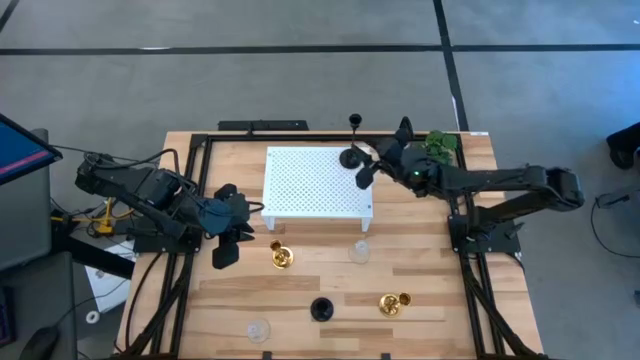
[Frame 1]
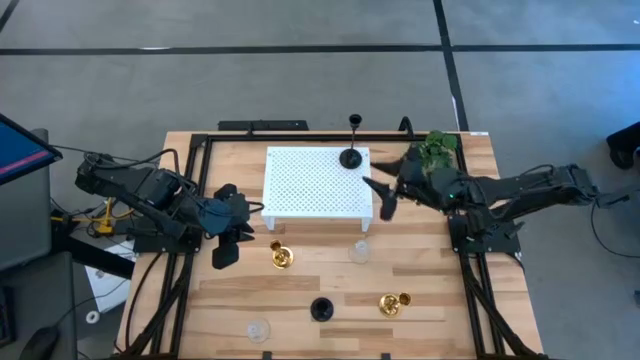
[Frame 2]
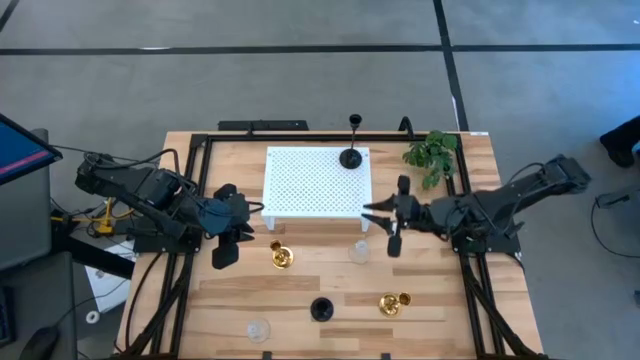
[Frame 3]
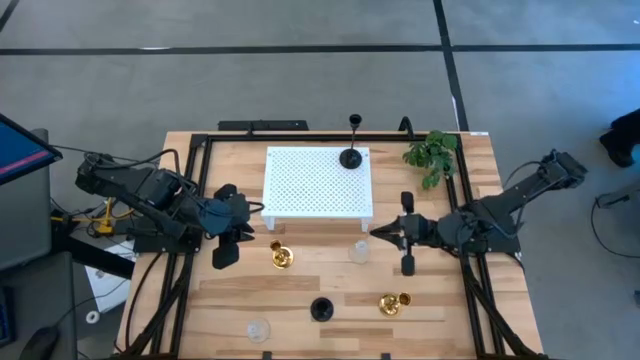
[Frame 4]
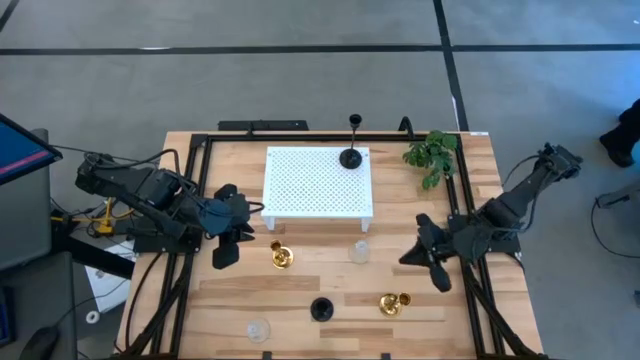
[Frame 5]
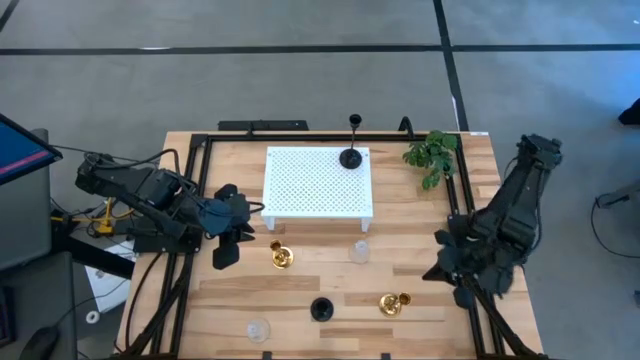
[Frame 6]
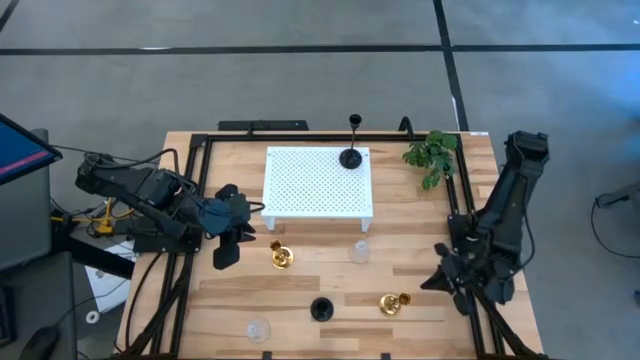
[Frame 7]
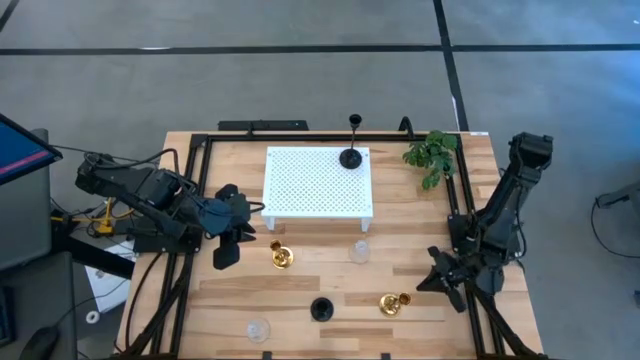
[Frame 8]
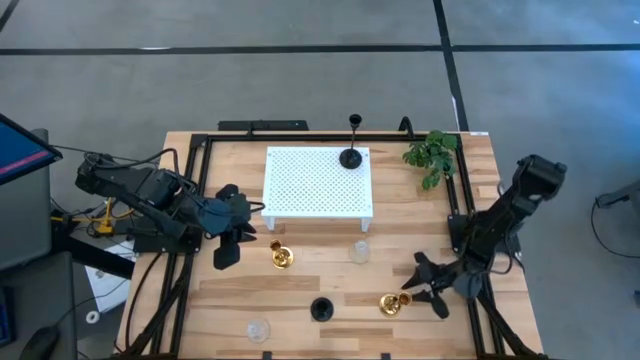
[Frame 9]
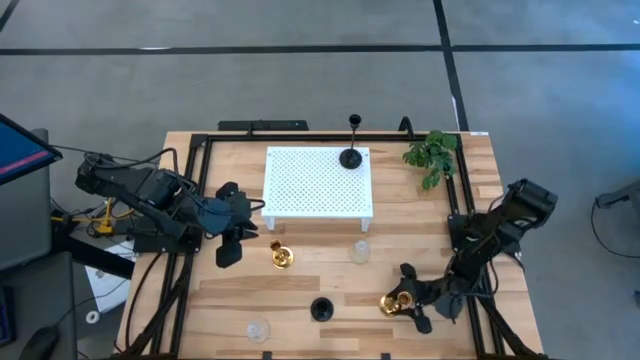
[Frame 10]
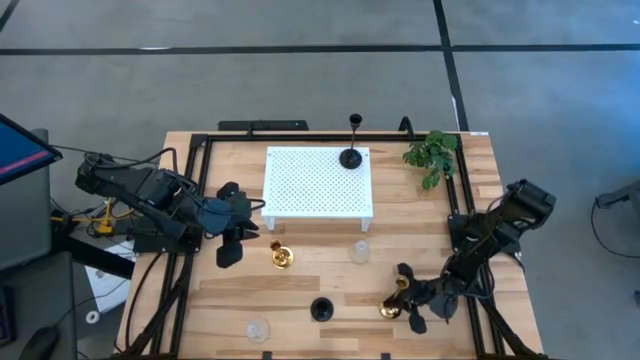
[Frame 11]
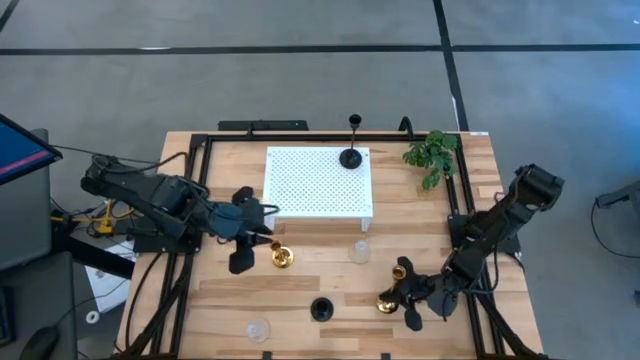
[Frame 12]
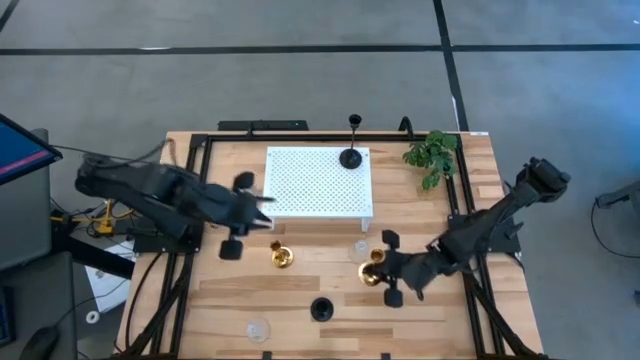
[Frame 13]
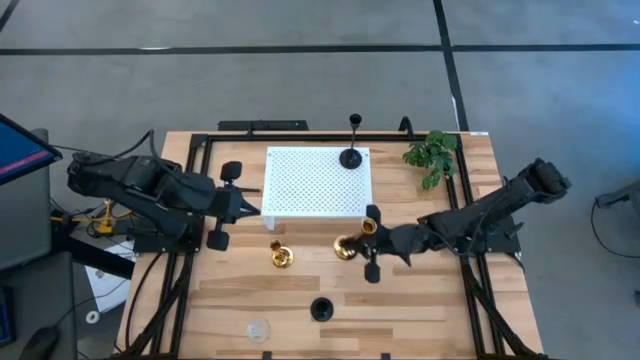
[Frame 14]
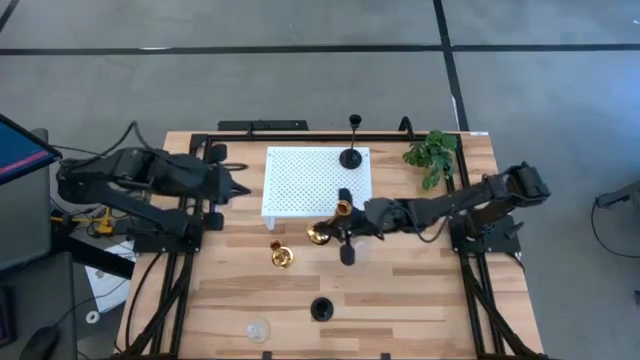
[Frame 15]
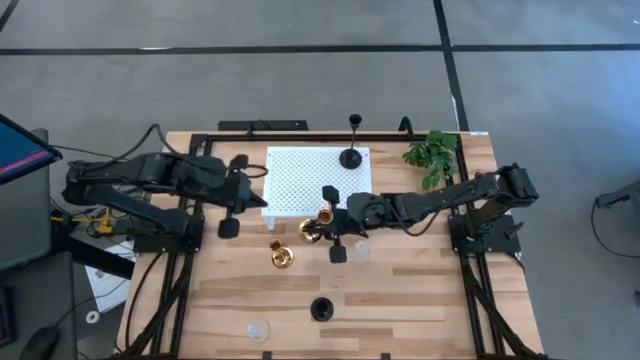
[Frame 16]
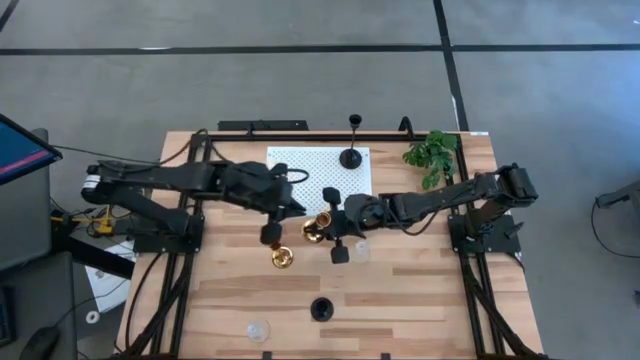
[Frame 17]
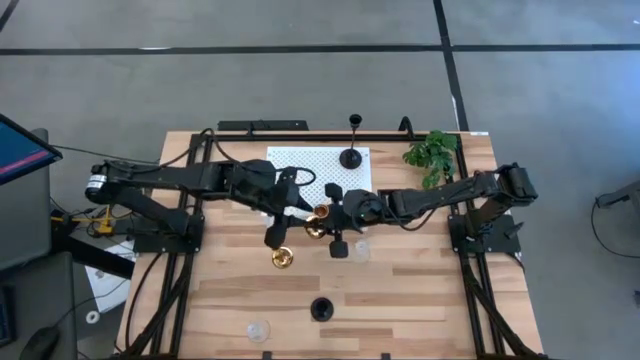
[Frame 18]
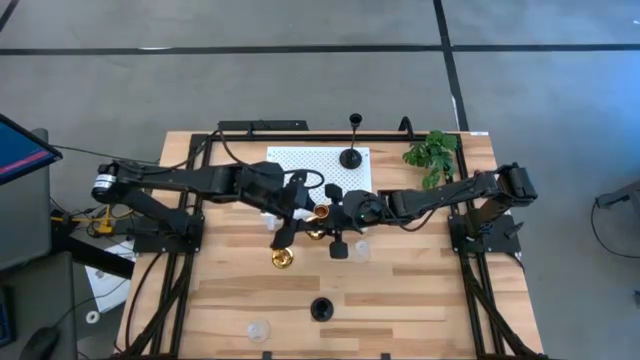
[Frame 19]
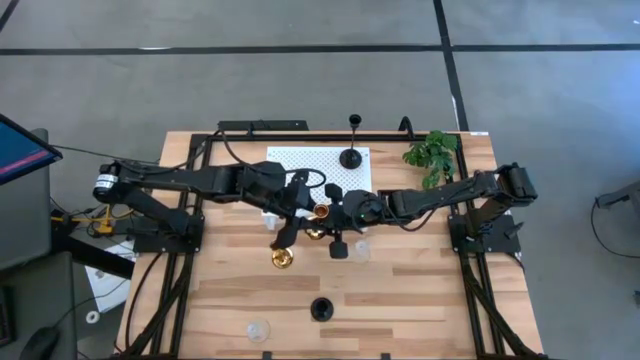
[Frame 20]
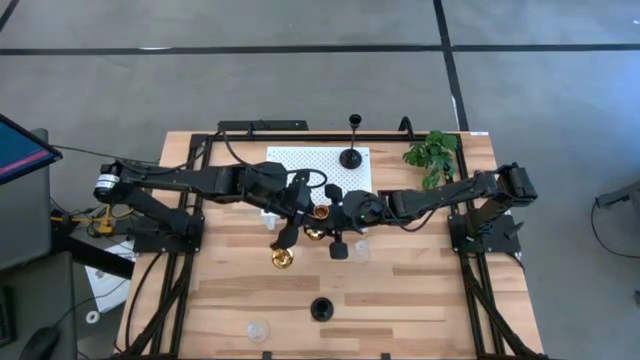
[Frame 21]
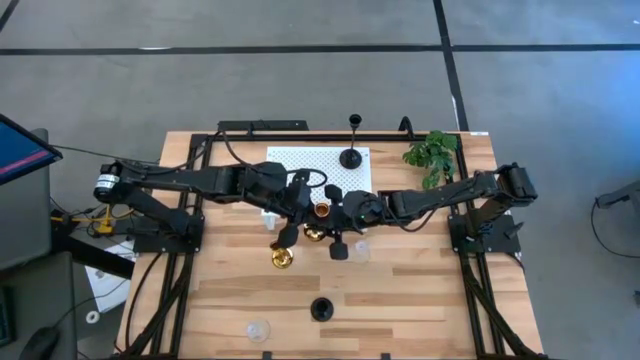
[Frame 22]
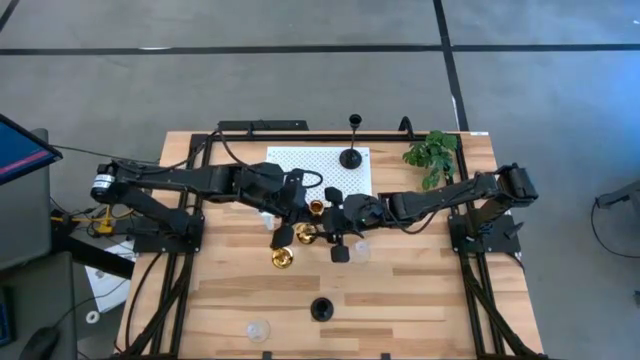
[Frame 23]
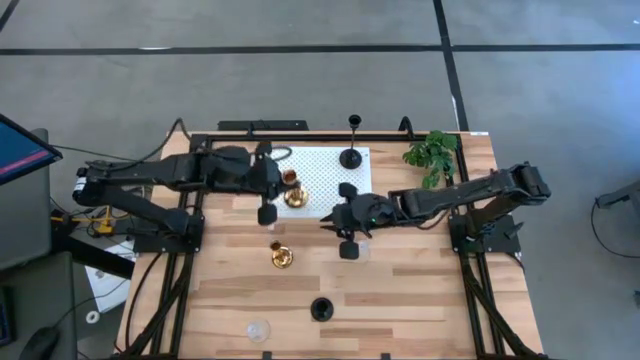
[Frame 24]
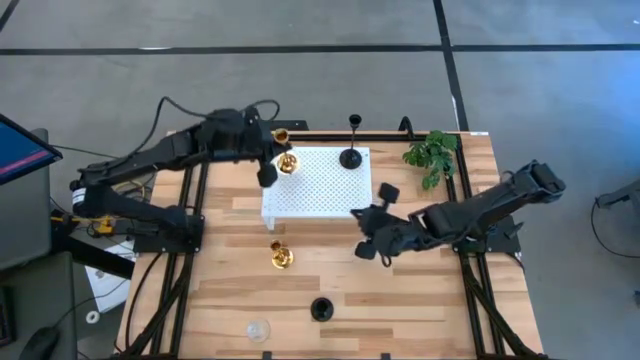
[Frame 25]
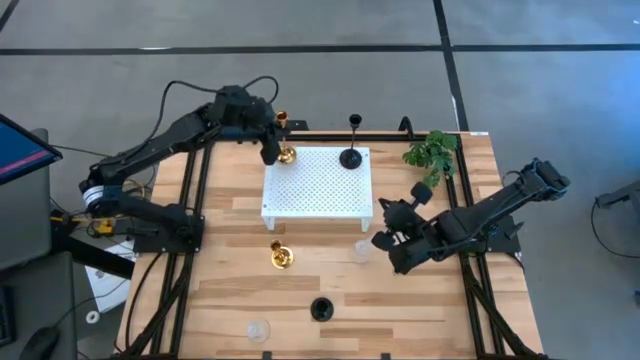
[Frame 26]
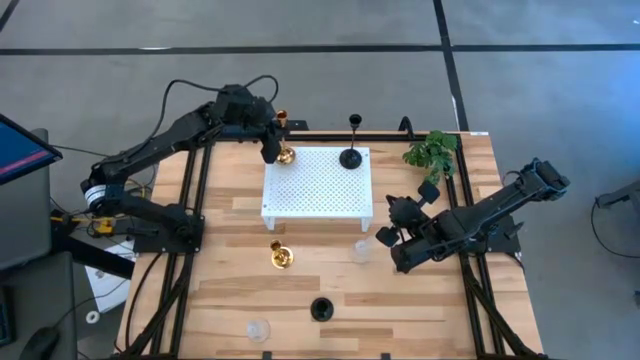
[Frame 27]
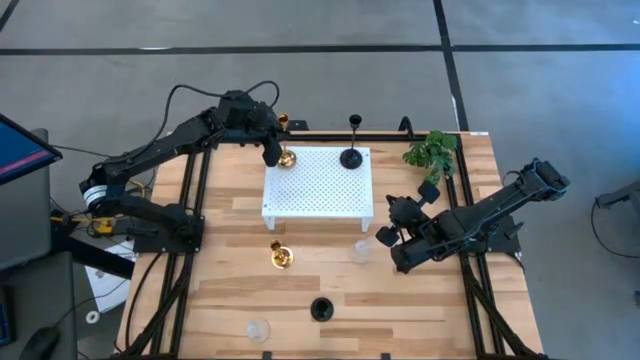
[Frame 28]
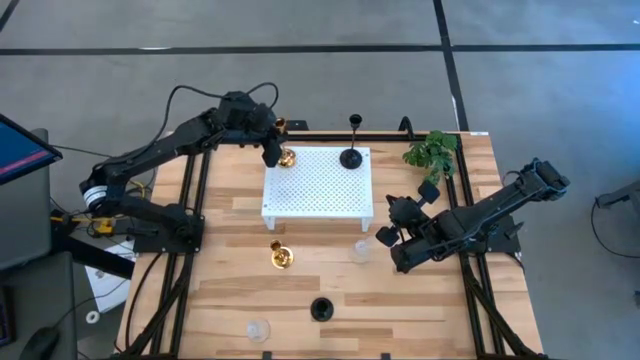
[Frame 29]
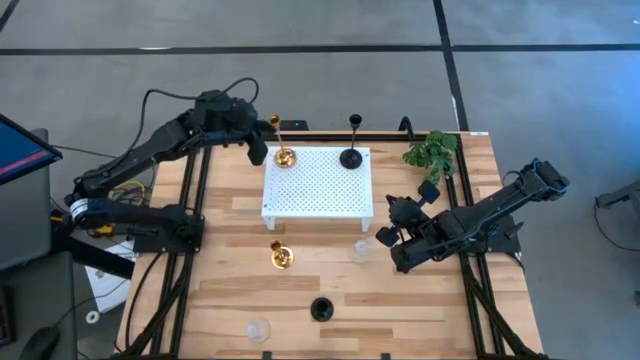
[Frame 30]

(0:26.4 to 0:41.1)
Task: Pick & Place candle stick holders
Put the right golden candle holder on the shelf

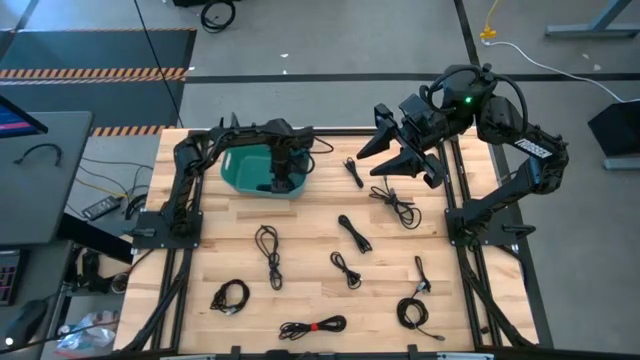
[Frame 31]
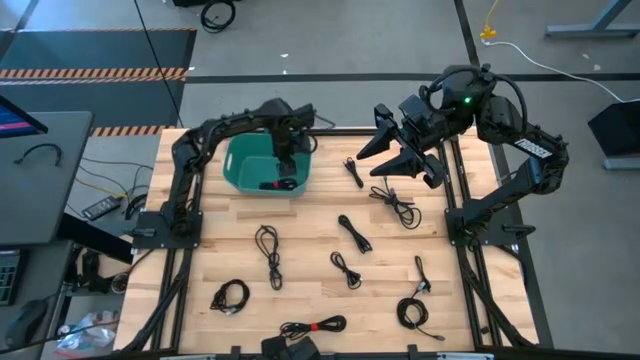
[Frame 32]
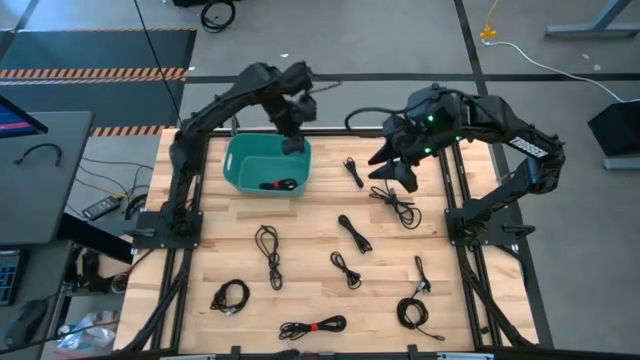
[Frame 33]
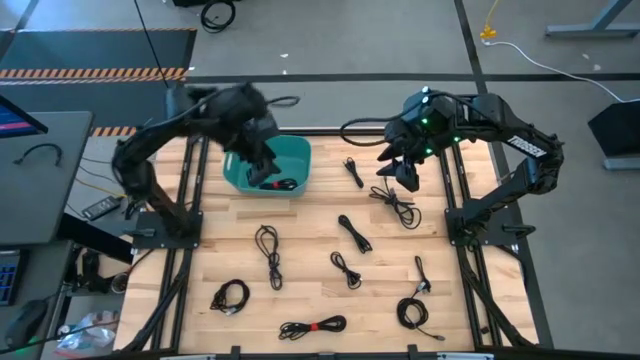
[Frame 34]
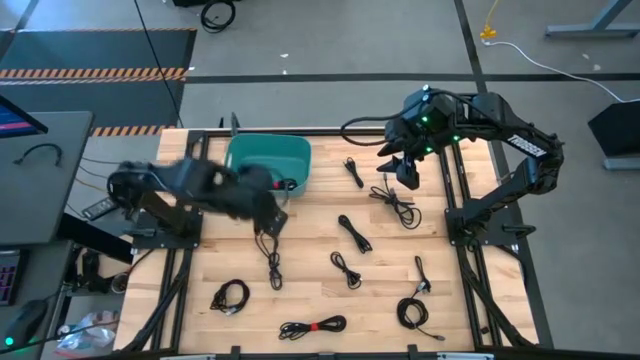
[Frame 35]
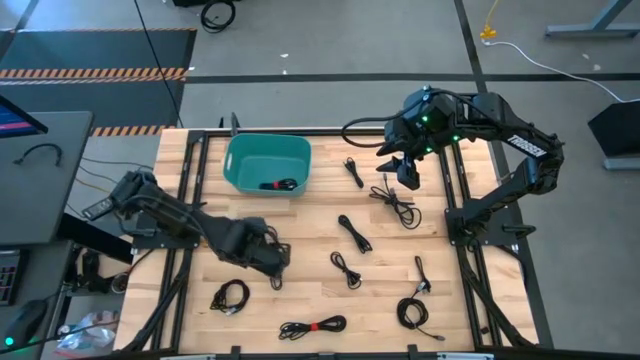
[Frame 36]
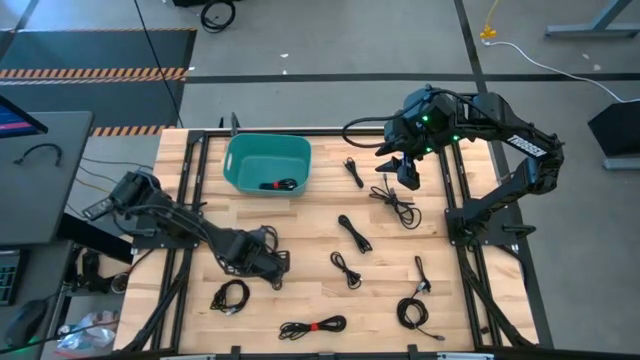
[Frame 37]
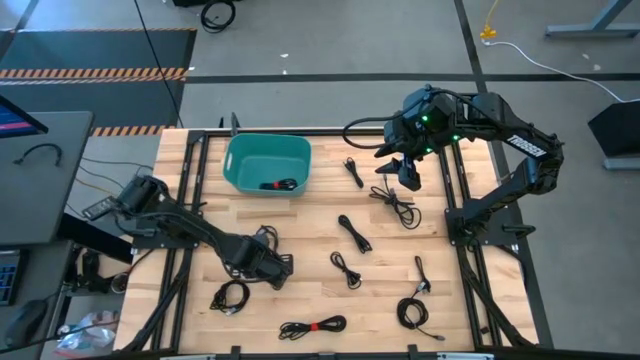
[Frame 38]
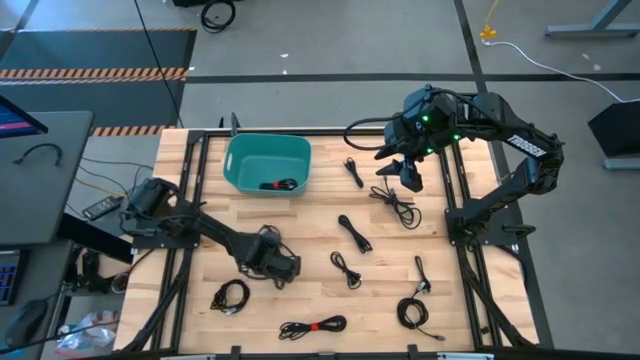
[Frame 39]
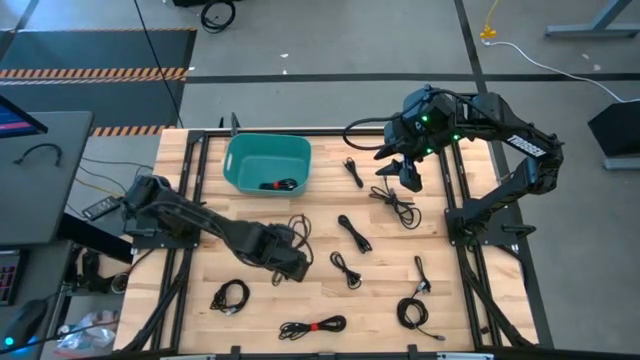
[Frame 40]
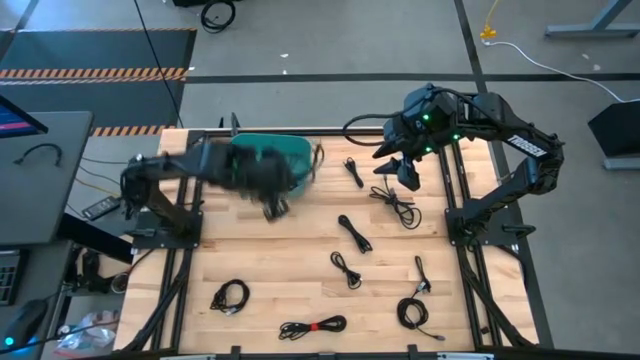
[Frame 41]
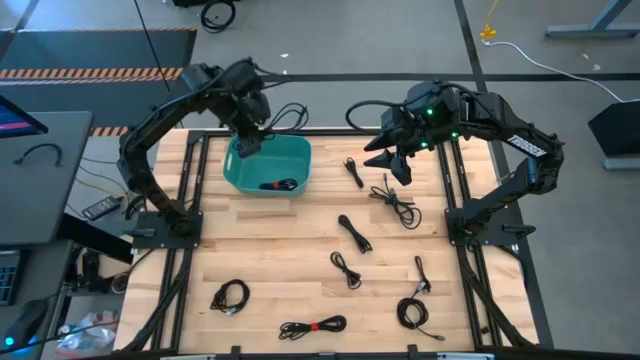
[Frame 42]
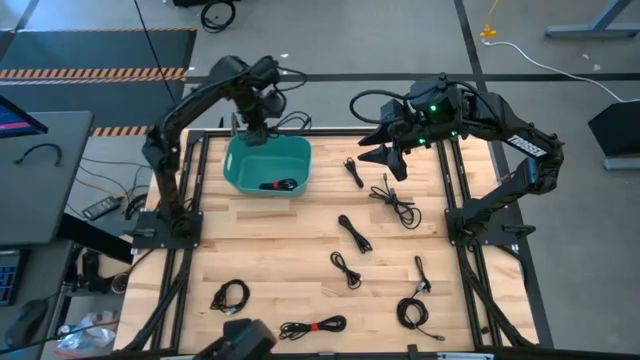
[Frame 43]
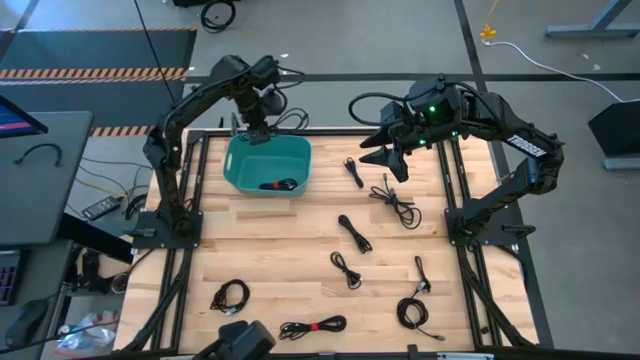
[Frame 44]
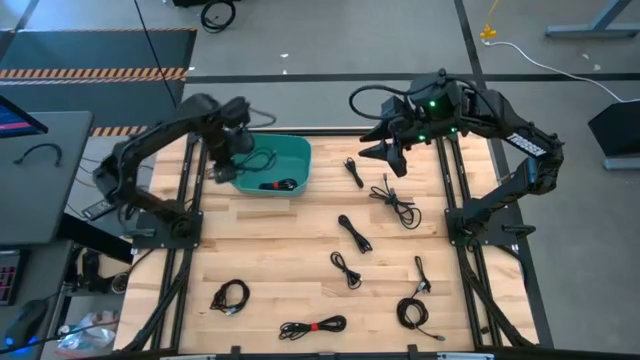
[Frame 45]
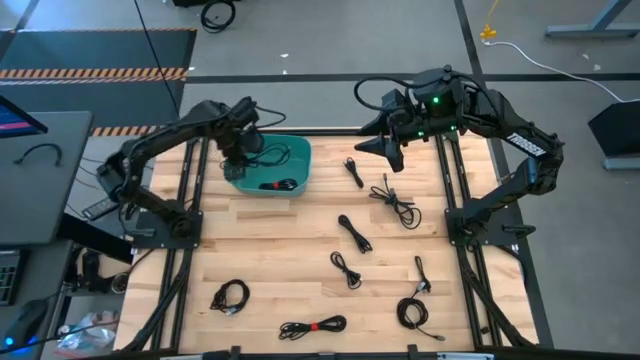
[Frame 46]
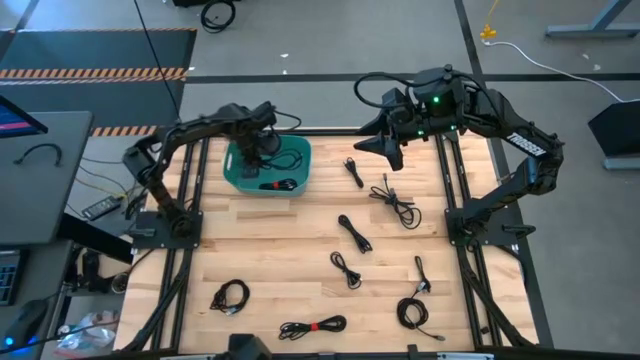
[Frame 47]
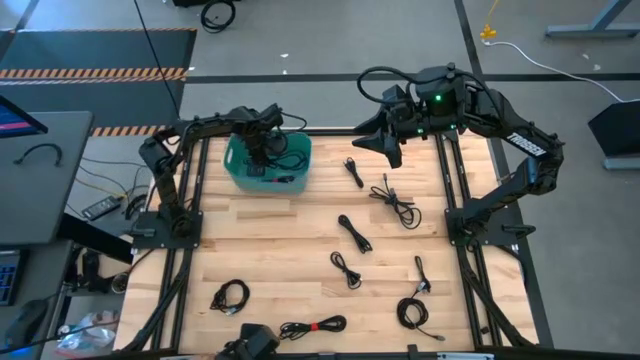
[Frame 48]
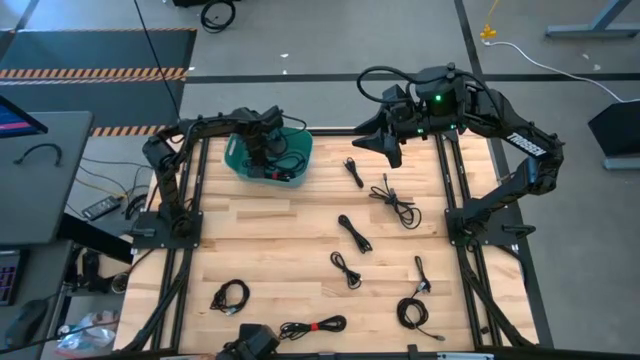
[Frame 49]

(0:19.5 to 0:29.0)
Task: Pick and place USB-C Cables
Put the black charger cable into the green bin
